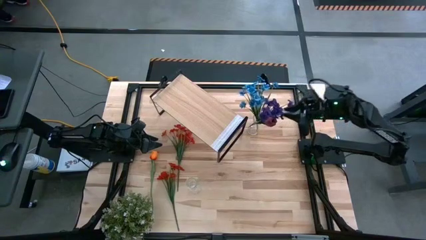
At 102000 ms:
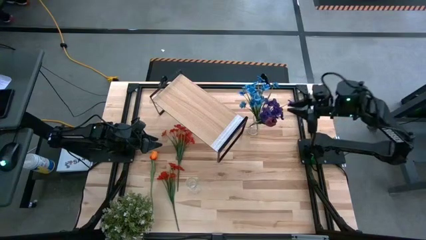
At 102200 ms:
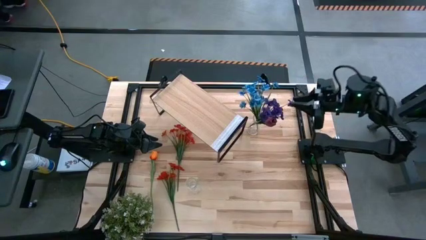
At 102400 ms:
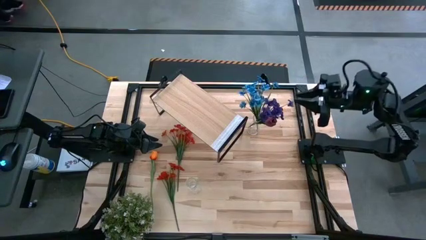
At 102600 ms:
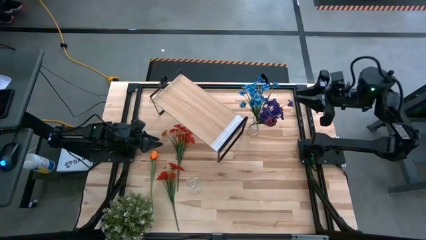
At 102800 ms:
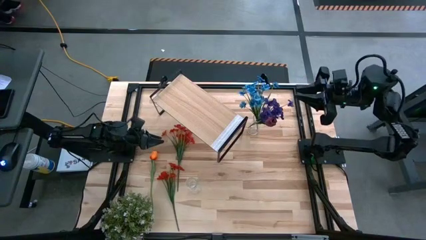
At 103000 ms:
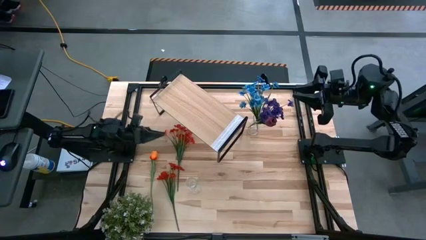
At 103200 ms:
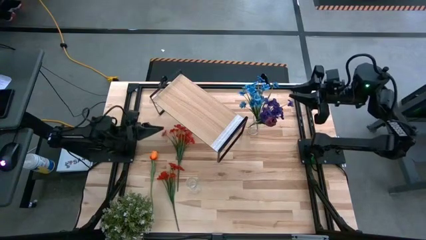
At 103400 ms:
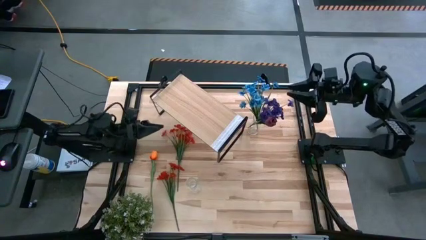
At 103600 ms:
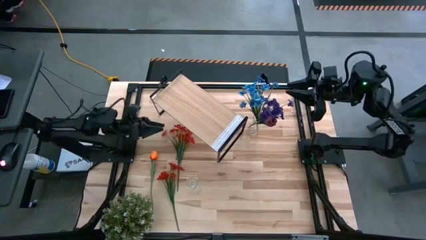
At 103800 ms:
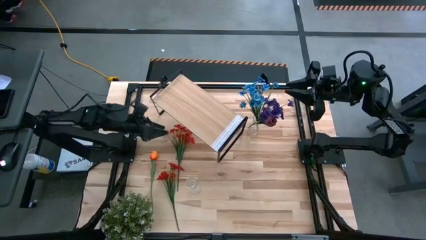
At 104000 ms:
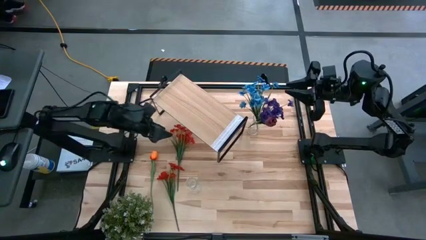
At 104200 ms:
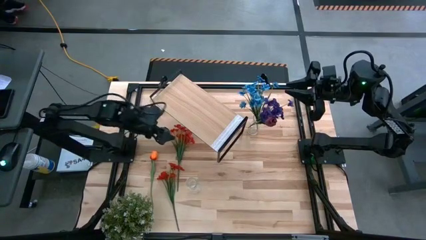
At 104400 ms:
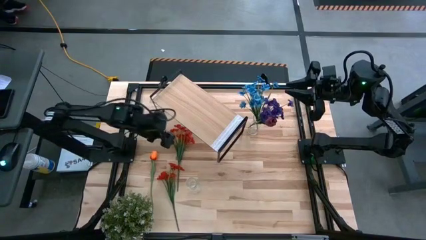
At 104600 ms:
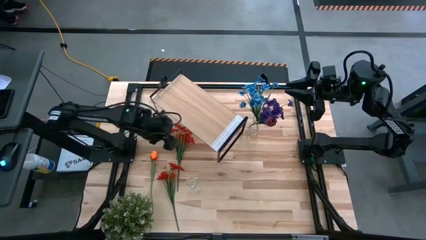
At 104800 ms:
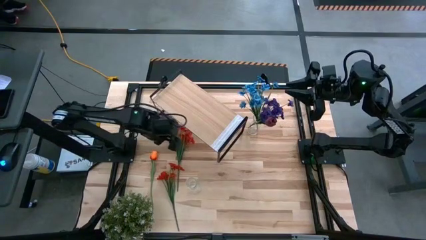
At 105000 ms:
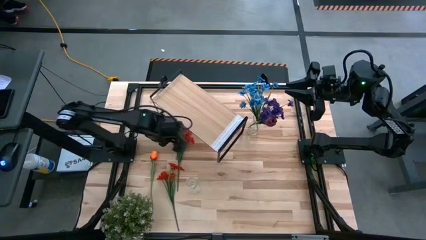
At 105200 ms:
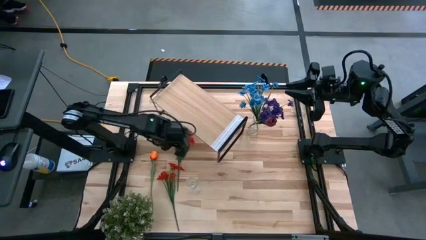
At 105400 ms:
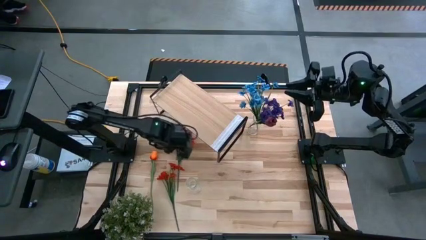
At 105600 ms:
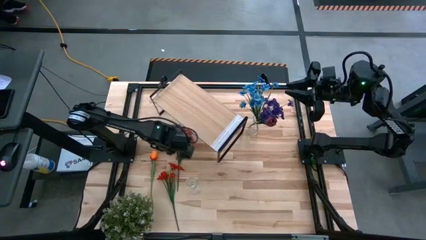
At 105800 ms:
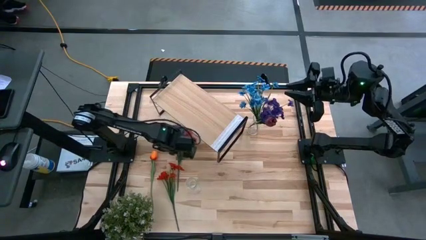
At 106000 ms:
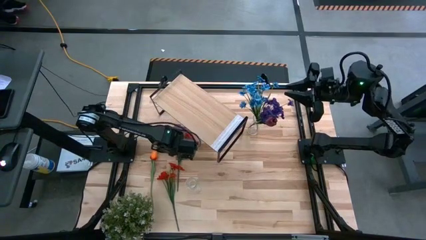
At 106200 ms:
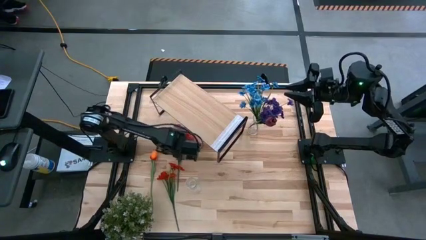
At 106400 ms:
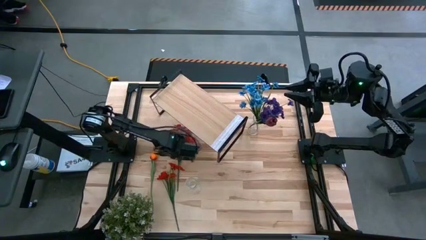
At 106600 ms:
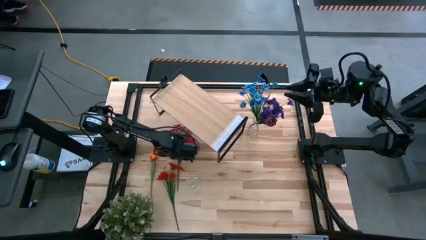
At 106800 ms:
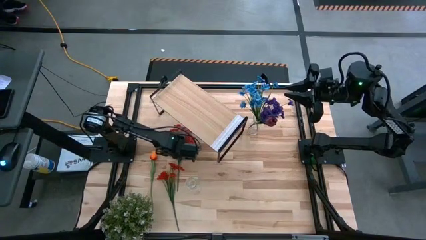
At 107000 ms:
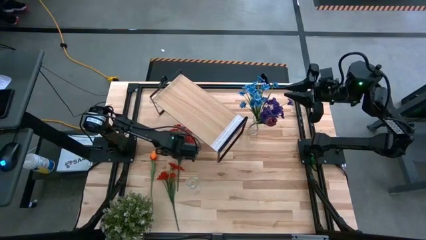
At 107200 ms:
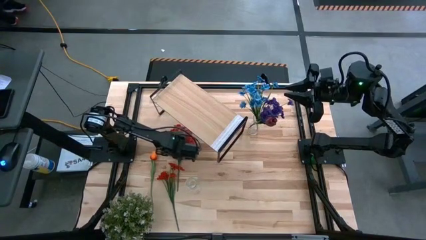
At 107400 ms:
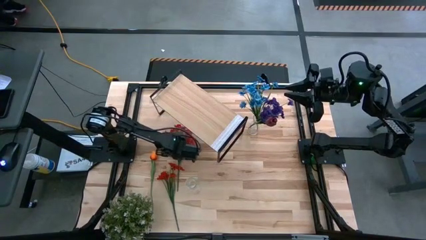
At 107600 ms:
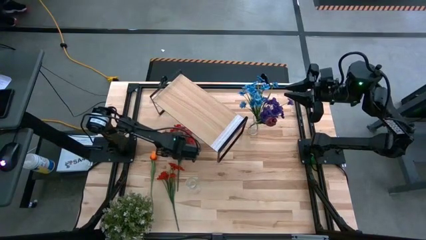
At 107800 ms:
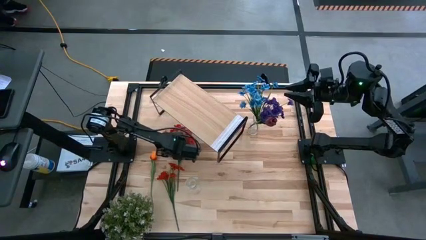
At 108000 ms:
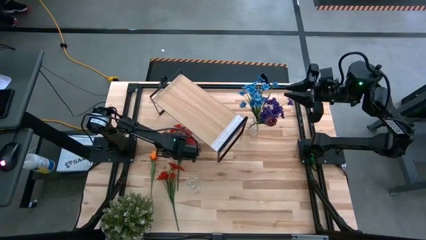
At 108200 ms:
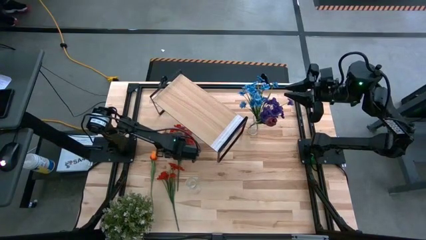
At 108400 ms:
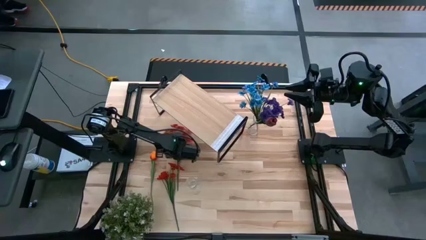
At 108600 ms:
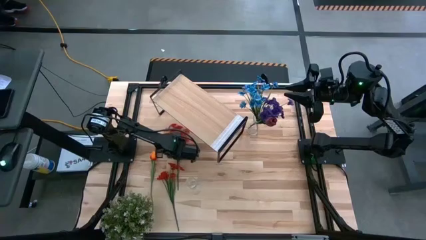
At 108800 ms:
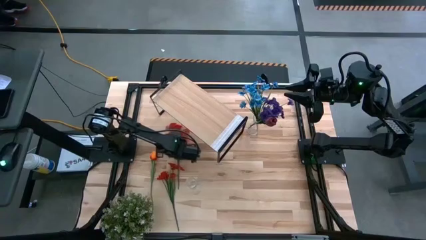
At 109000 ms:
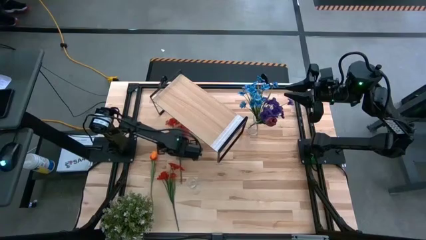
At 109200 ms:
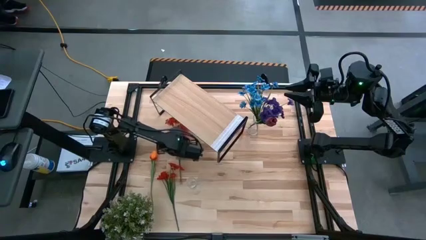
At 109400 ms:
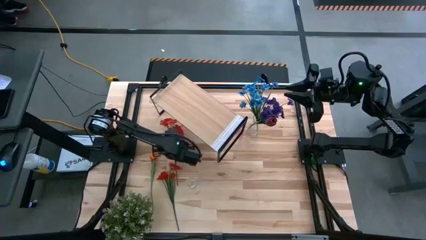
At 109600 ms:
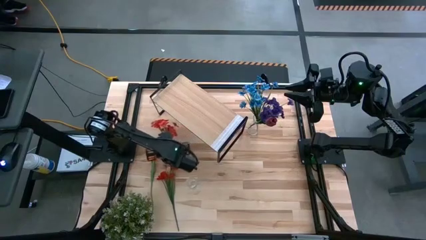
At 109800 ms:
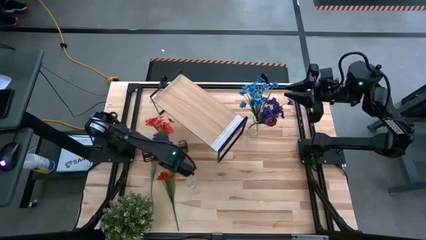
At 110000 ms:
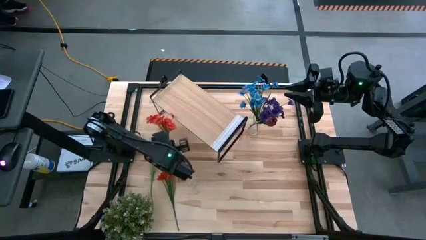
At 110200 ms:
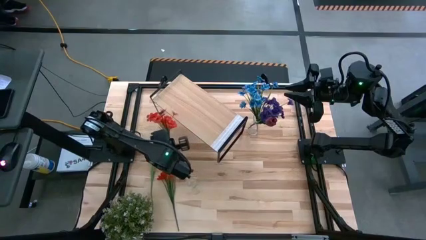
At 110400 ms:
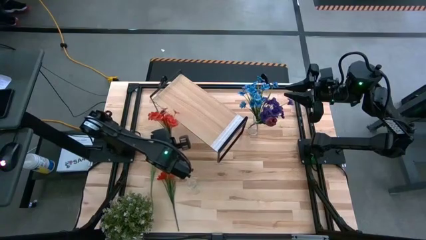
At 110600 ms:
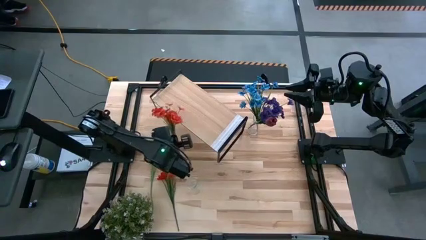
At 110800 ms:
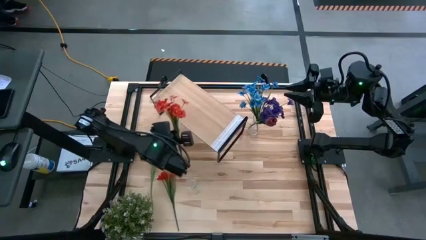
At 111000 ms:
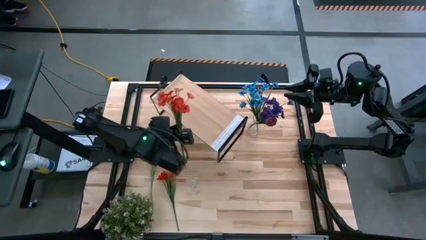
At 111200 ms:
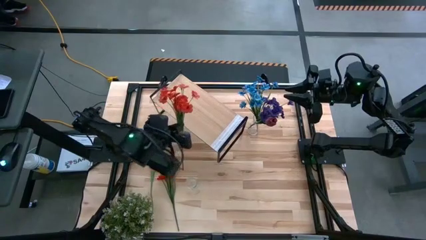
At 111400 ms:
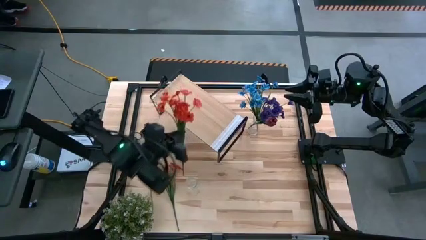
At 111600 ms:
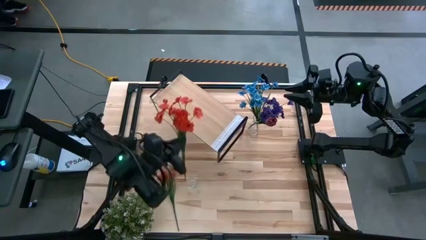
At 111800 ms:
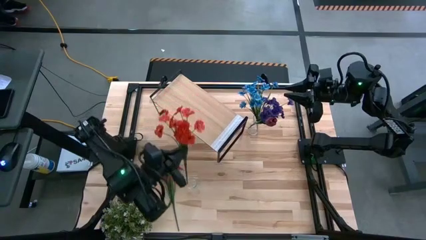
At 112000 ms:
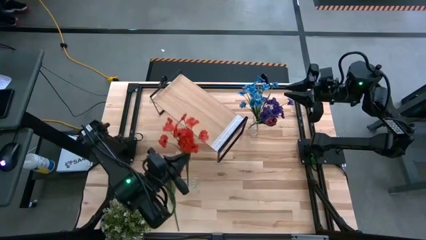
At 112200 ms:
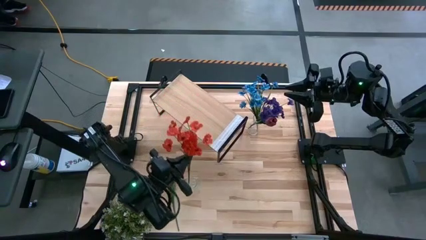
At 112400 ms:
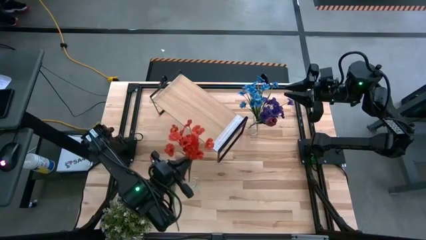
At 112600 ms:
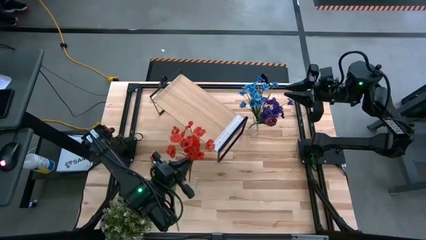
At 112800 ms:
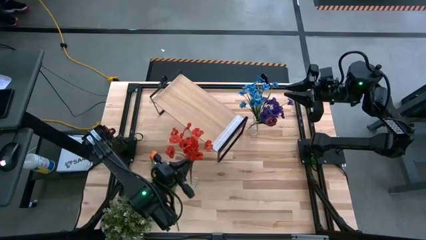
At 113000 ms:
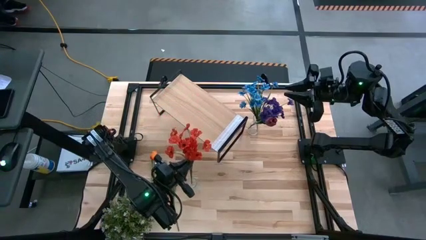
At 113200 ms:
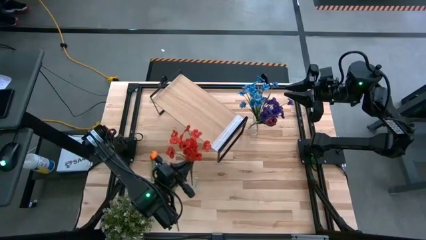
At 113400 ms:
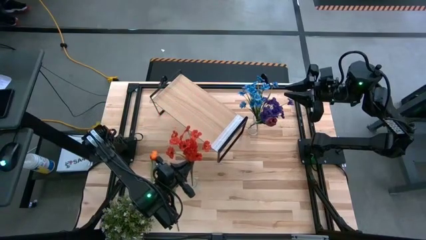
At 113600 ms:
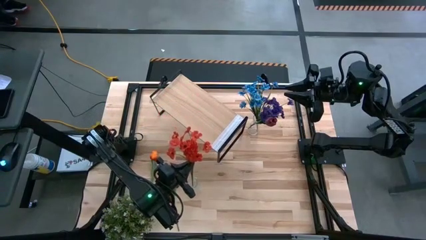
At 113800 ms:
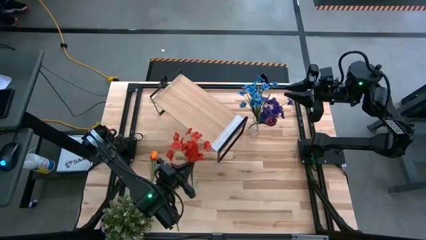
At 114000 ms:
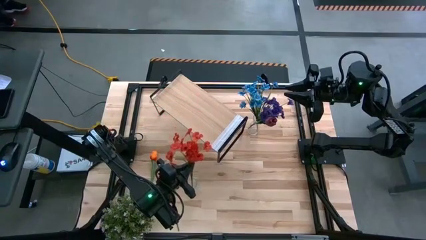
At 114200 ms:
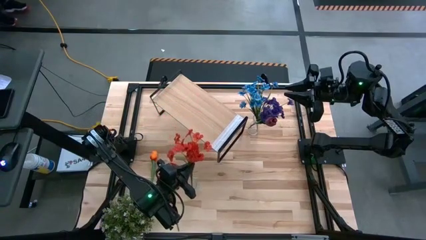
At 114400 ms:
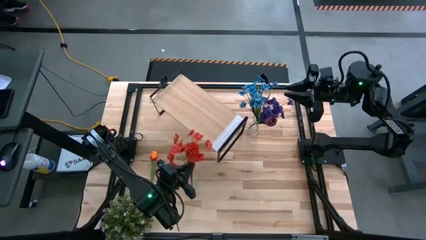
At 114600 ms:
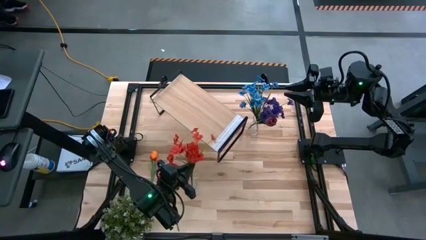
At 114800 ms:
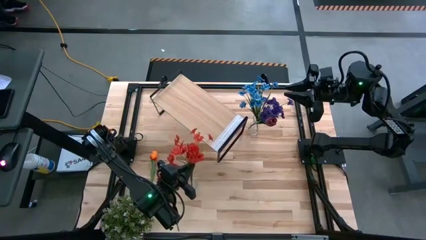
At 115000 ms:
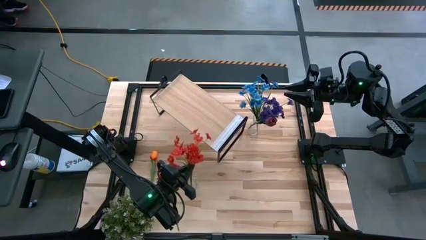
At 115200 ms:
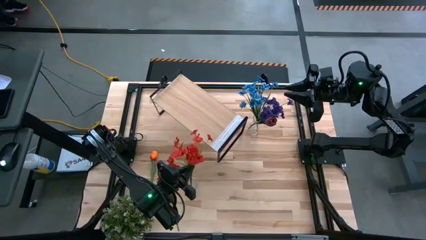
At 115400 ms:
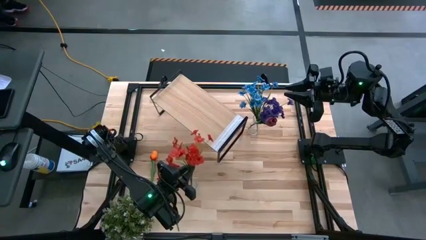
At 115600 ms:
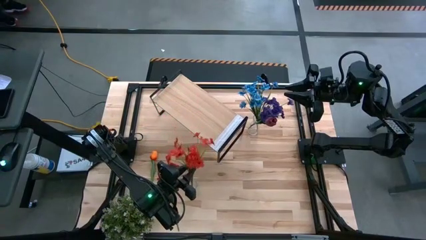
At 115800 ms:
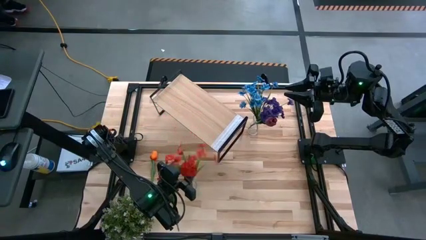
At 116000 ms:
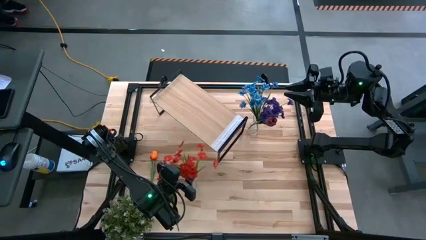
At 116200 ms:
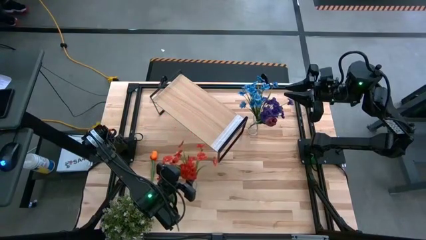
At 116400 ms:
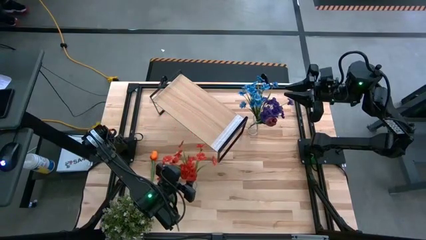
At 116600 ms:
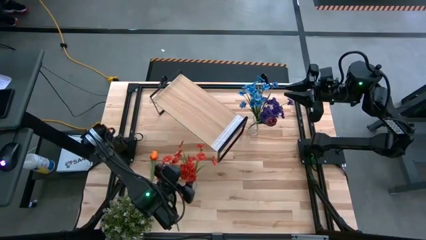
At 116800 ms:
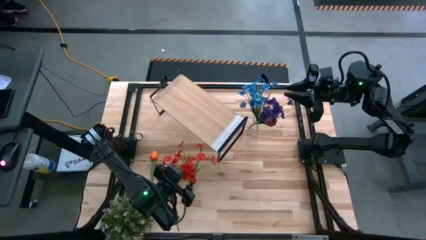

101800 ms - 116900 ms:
Task: Pick and place flowers into a vace then onto a shelf
Put the top red flowers into the bottom transparent vase
